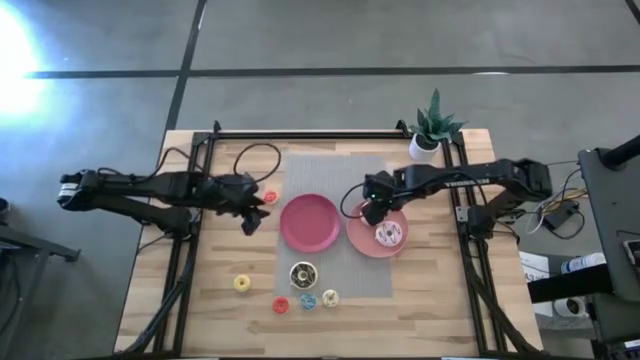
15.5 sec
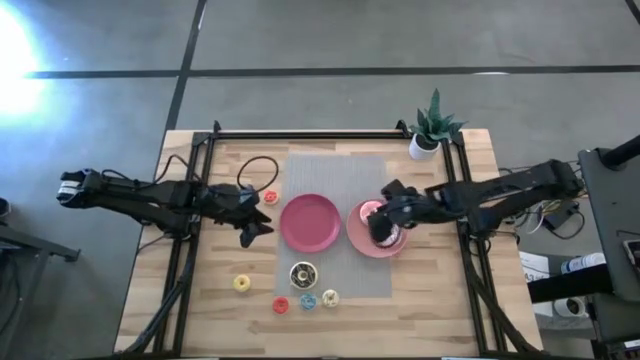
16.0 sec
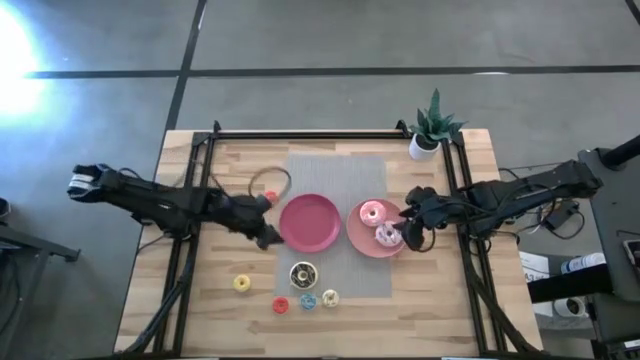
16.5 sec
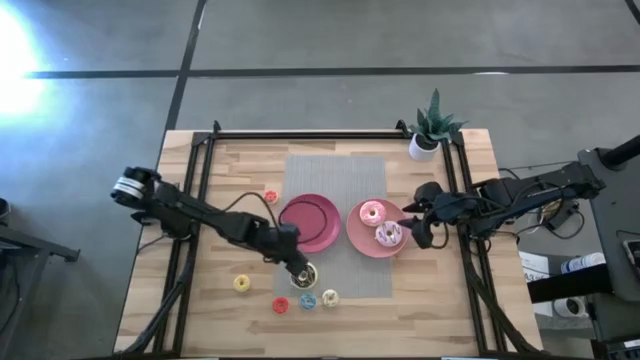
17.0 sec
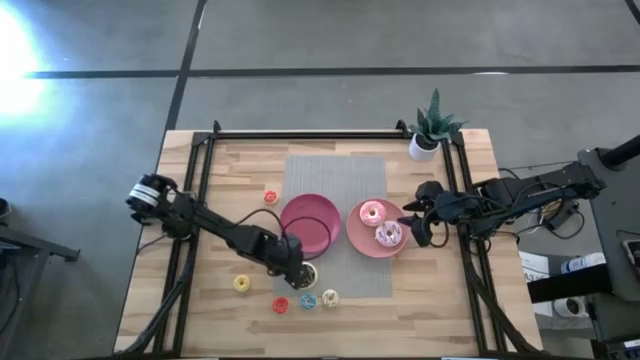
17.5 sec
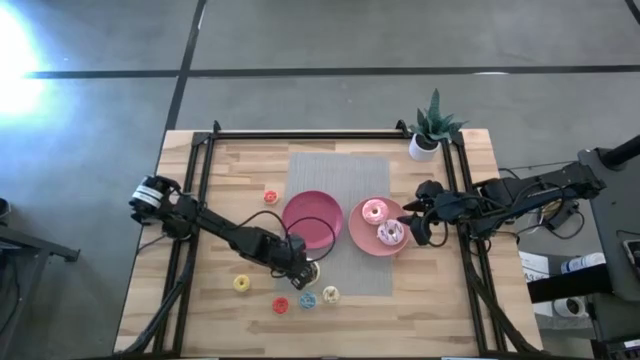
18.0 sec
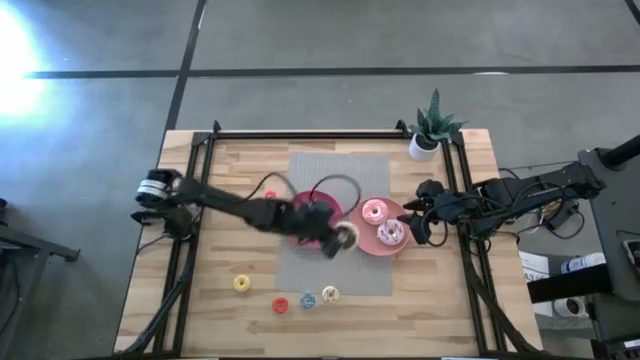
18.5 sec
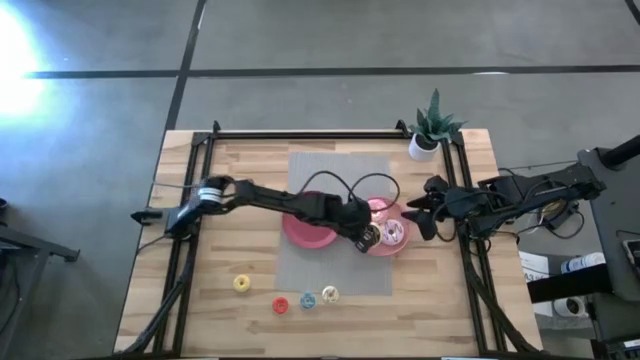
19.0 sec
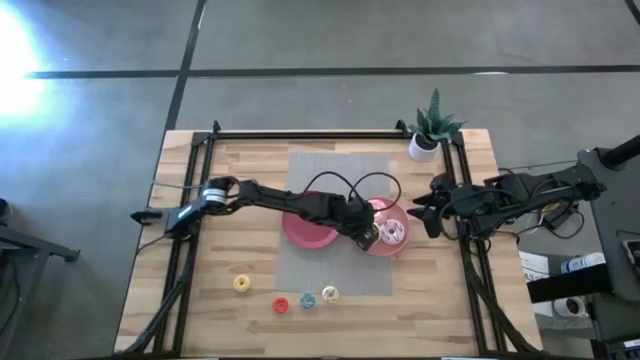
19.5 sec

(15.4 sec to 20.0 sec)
Task: Pick & Place donuts
Put the large black doughnut on the light pink plate

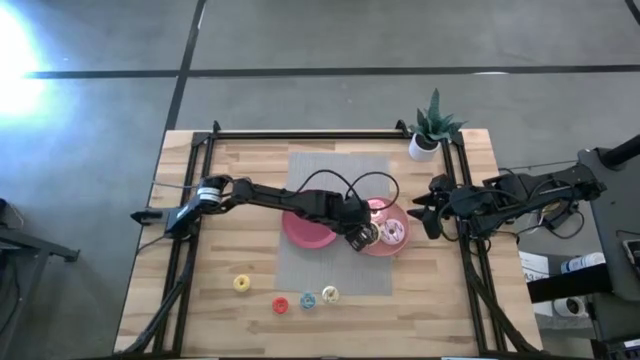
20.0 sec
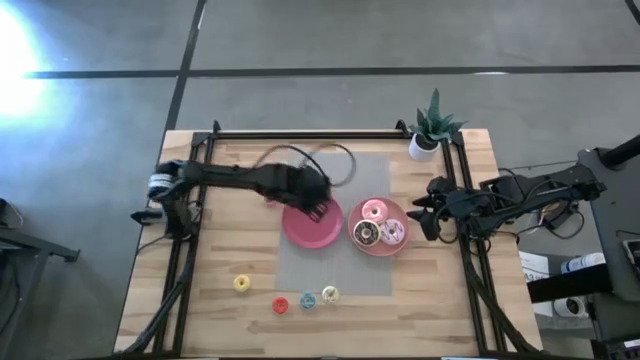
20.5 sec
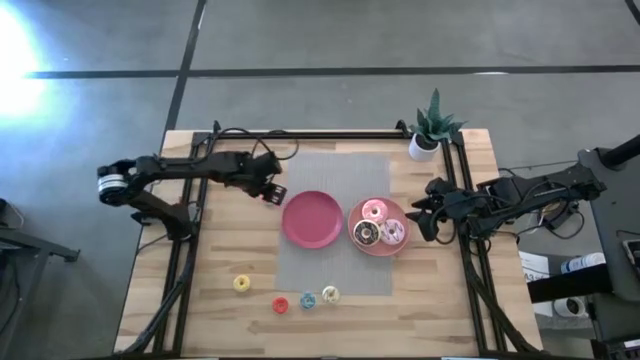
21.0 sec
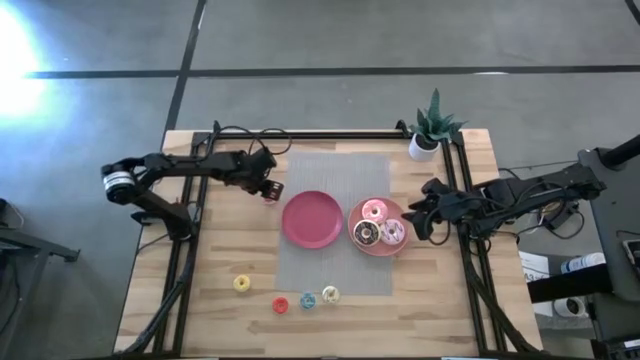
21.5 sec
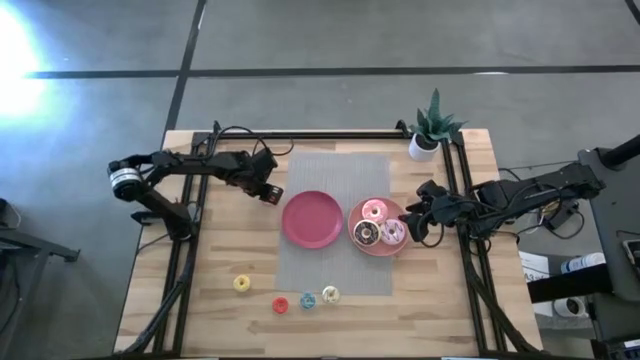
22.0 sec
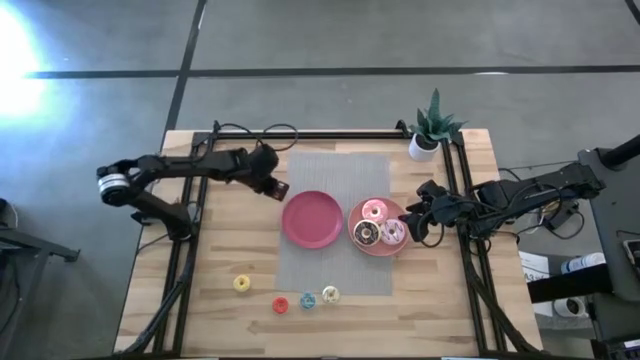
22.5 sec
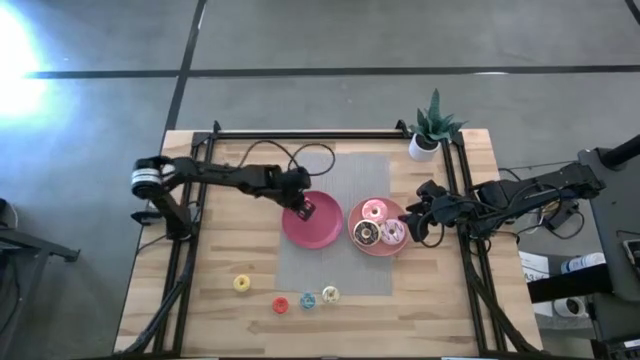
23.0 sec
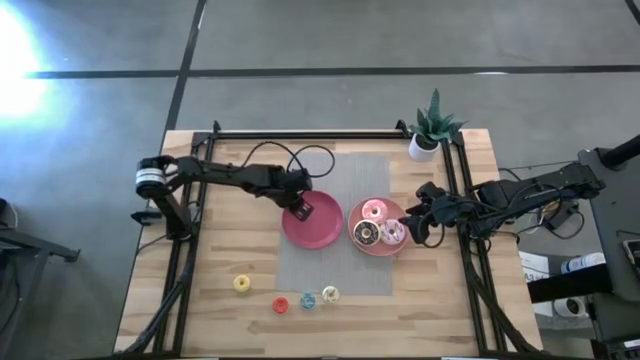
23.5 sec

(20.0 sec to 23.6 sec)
Put the small orange doughnut on the pink plate

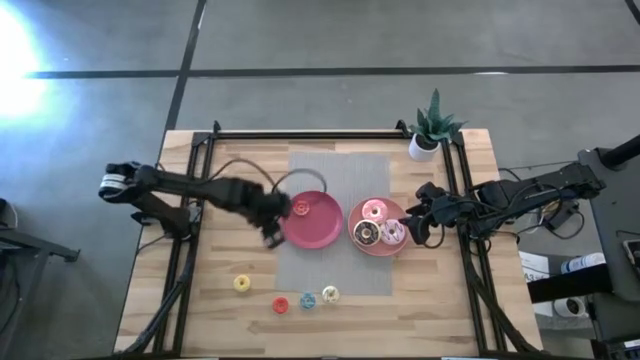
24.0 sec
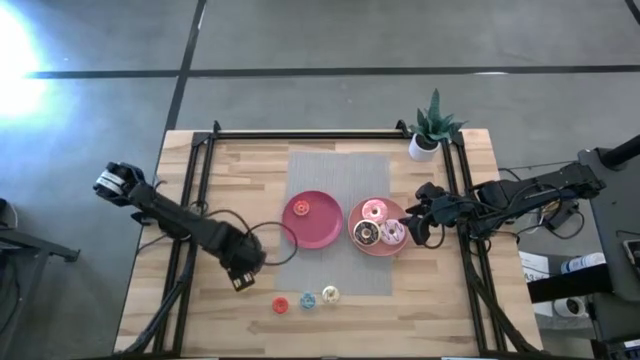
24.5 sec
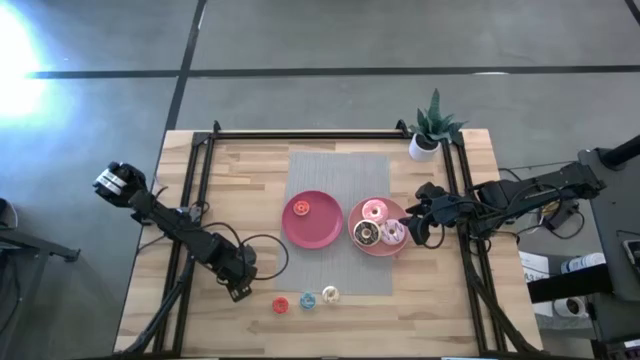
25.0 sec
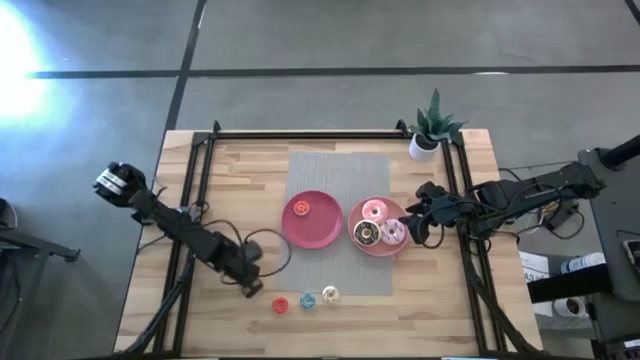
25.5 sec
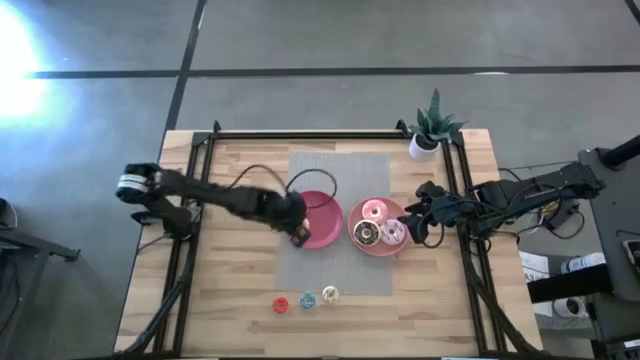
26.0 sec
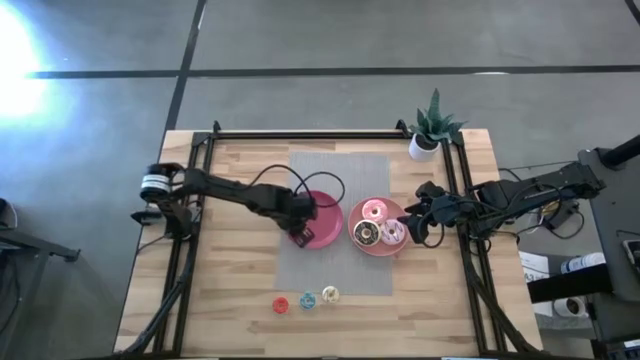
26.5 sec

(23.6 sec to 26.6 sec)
Put the small yellow doughnut on the pink plate

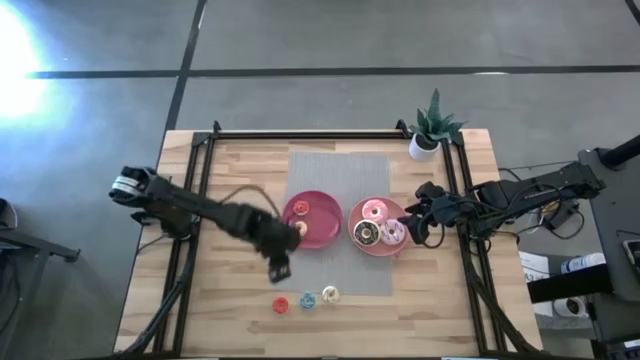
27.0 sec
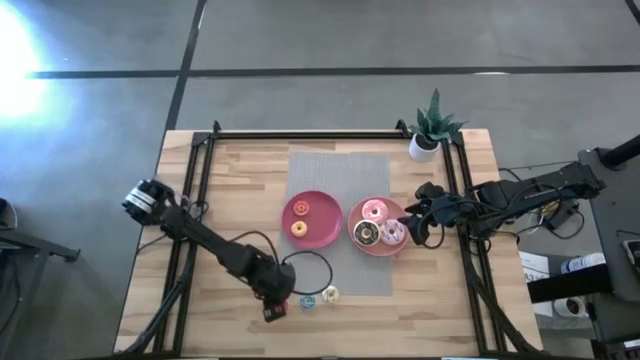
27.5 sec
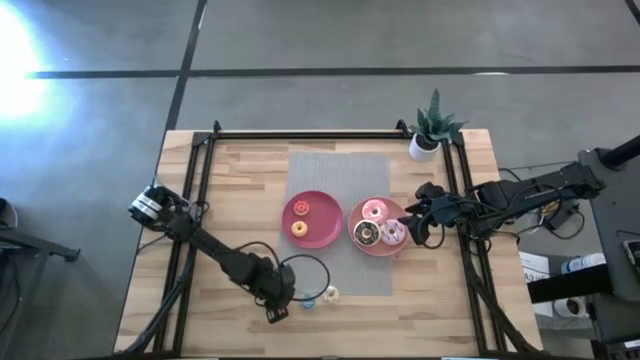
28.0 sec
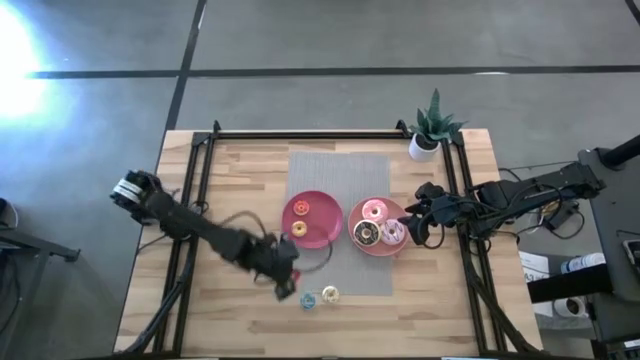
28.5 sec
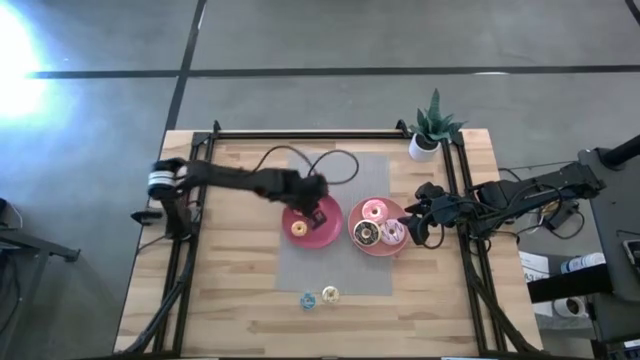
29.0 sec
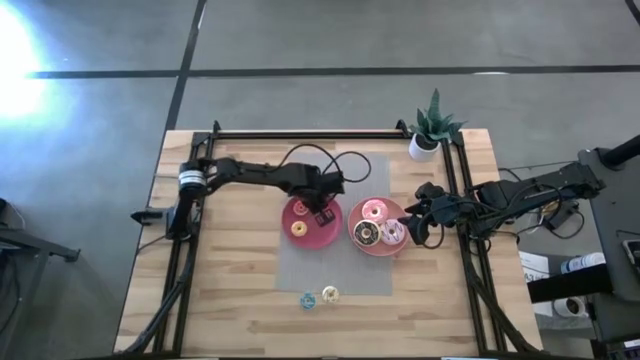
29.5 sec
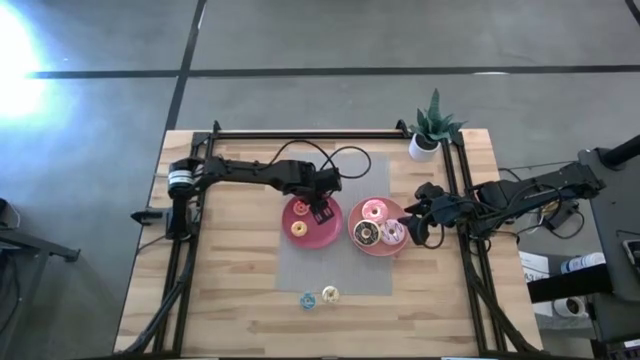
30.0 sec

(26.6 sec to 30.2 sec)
Put the small red doughnut on the pink plate

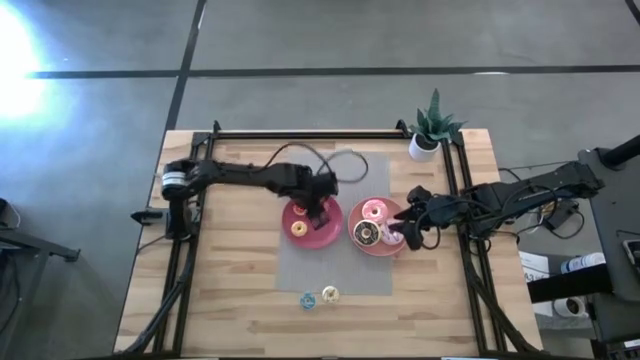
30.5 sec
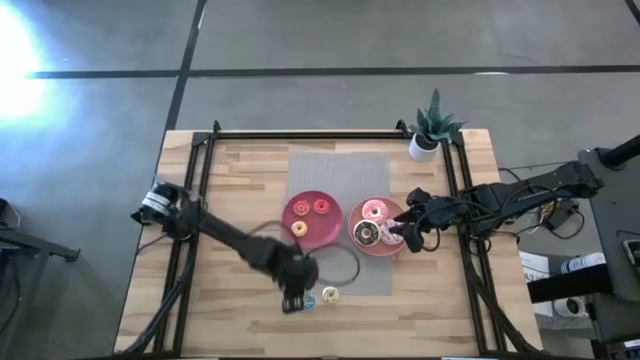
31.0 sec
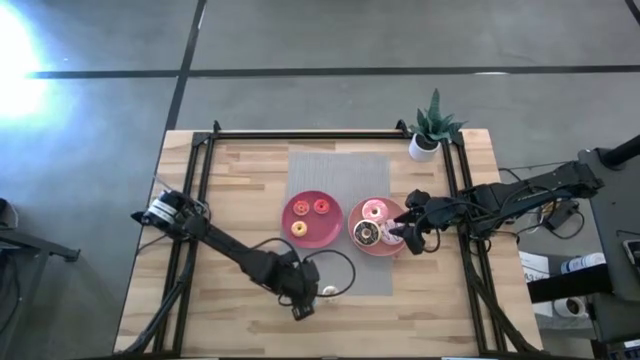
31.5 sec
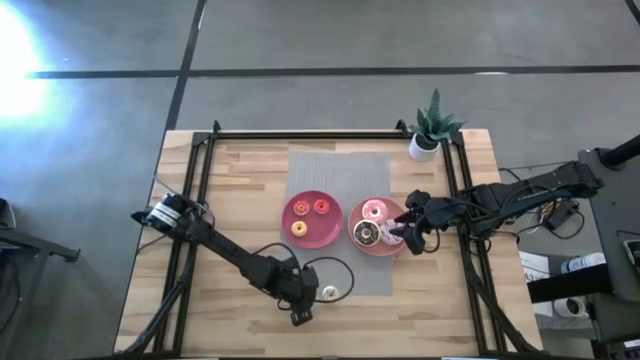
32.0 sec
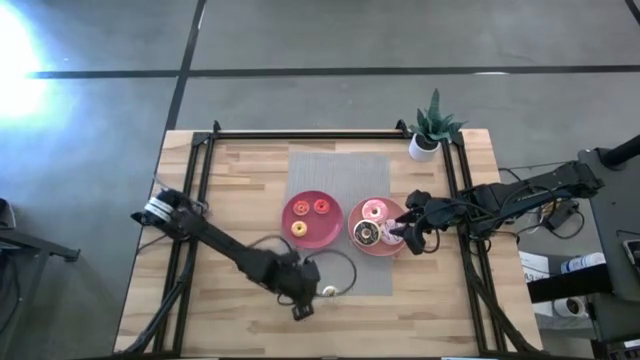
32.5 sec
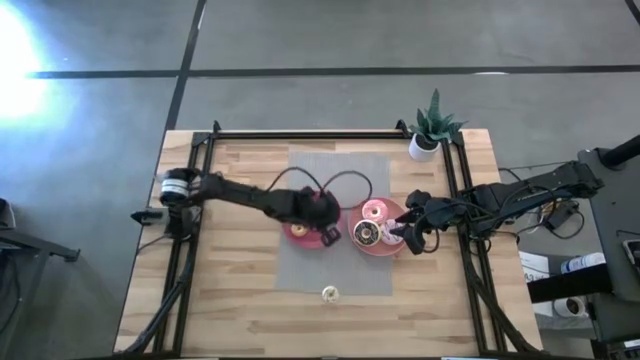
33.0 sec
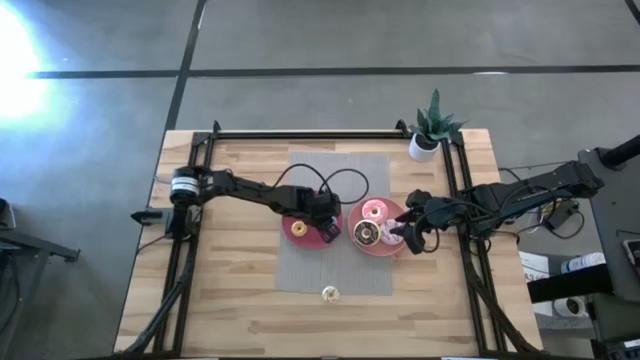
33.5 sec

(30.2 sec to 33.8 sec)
Put the small blue doughnut on the pink plate

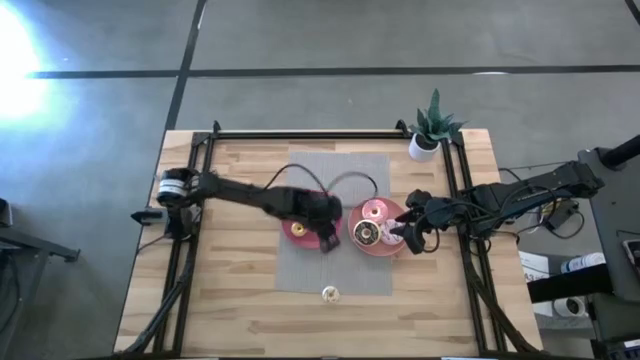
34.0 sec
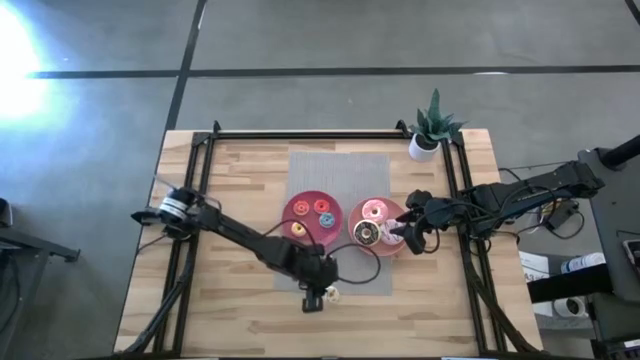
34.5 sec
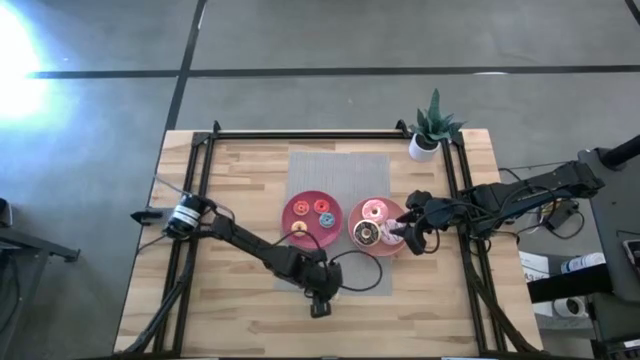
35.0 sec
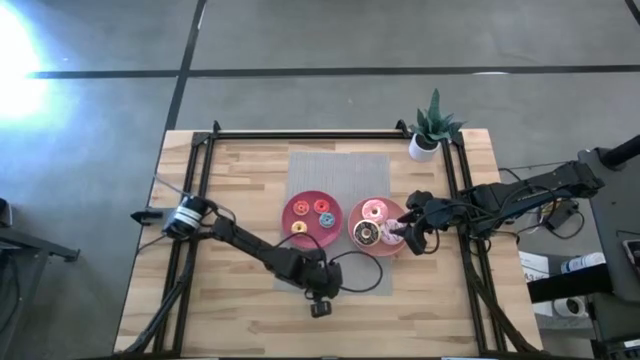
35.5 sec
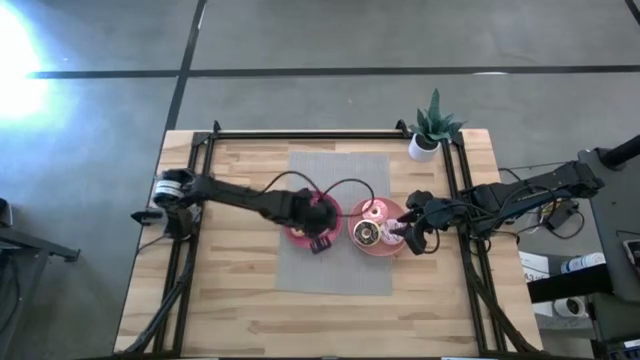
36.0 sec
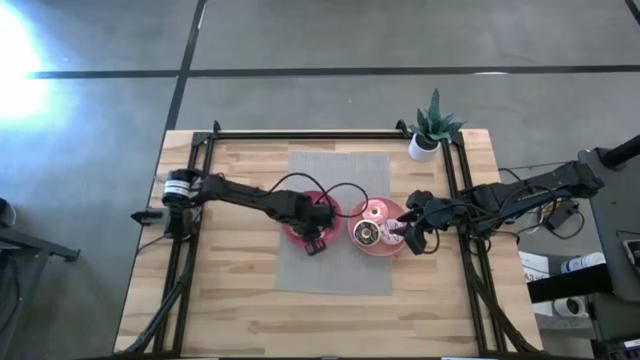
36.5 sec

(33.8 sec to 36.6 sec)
Put the small white doughnut on the pink plate
